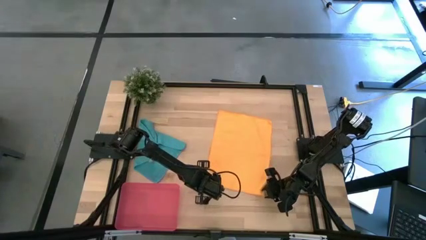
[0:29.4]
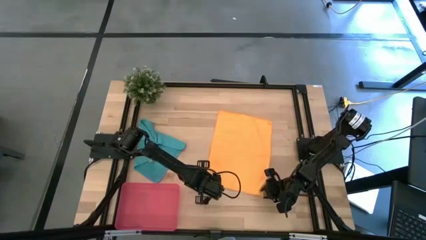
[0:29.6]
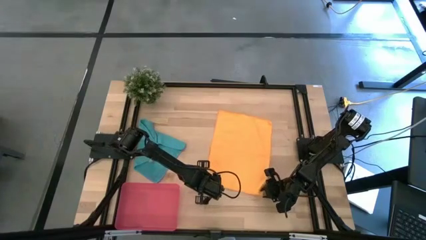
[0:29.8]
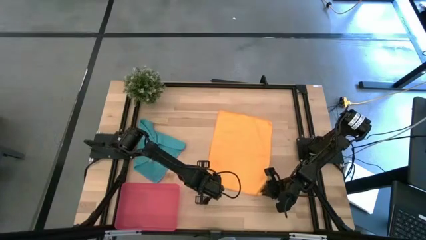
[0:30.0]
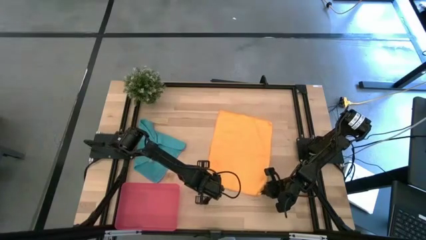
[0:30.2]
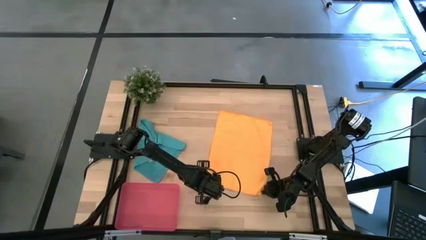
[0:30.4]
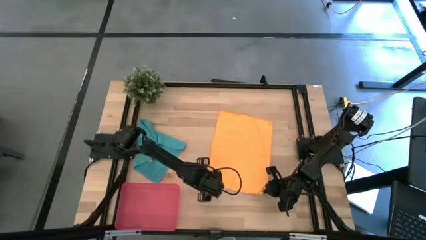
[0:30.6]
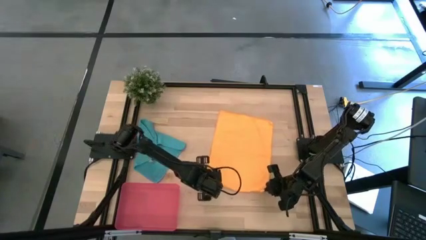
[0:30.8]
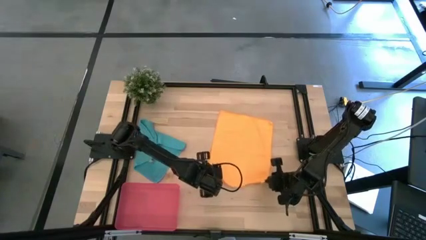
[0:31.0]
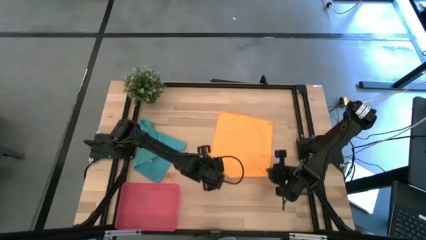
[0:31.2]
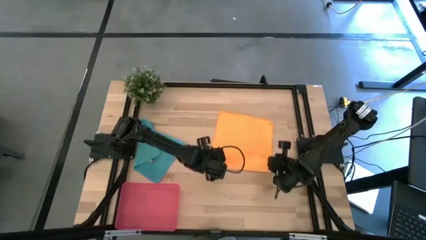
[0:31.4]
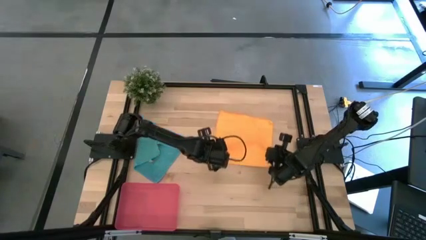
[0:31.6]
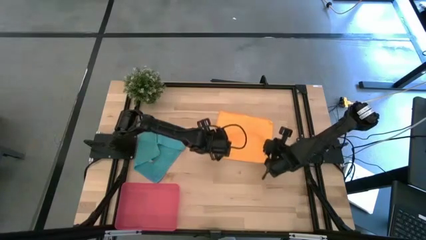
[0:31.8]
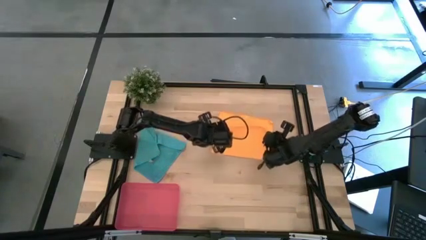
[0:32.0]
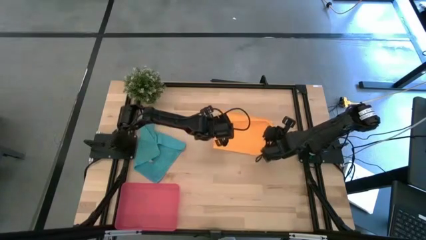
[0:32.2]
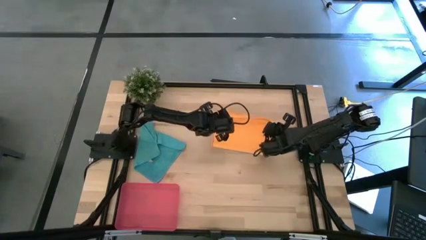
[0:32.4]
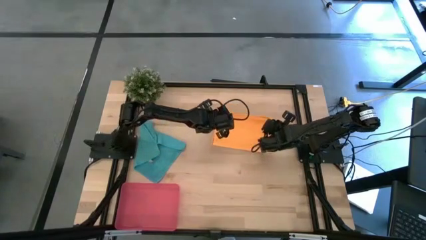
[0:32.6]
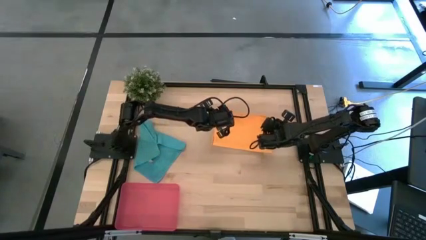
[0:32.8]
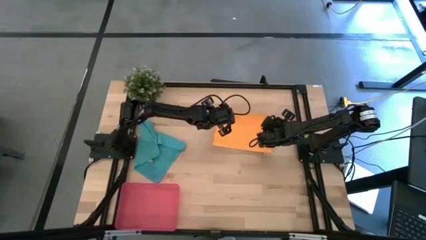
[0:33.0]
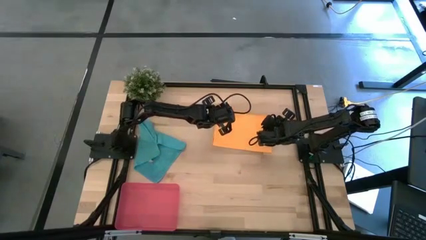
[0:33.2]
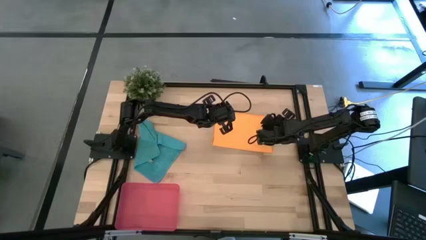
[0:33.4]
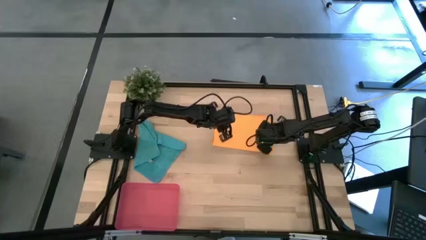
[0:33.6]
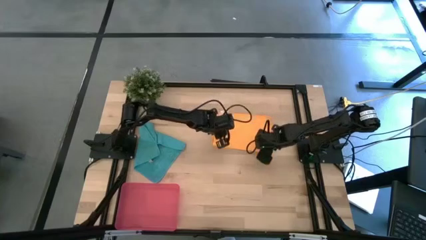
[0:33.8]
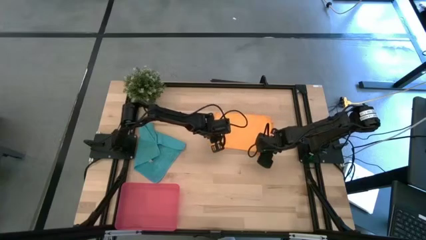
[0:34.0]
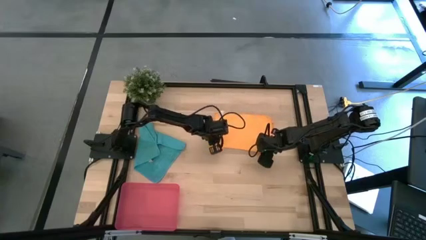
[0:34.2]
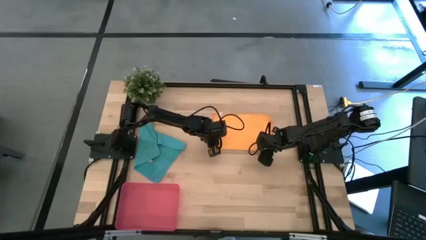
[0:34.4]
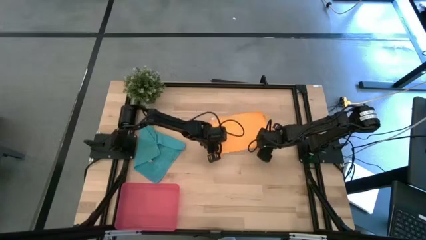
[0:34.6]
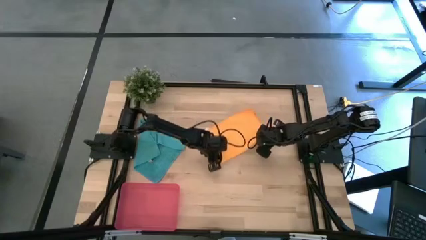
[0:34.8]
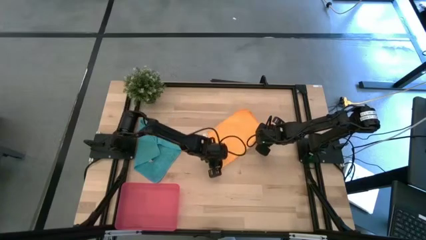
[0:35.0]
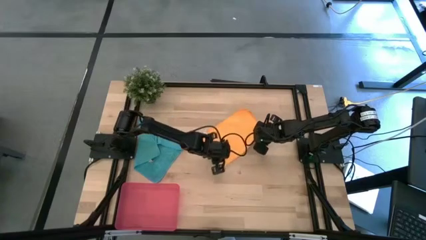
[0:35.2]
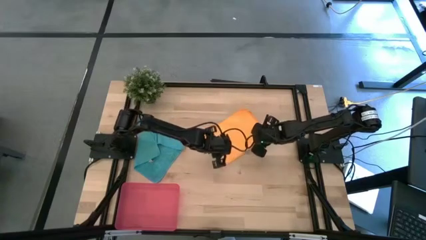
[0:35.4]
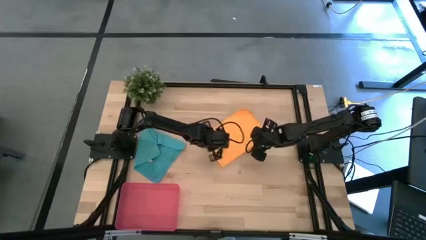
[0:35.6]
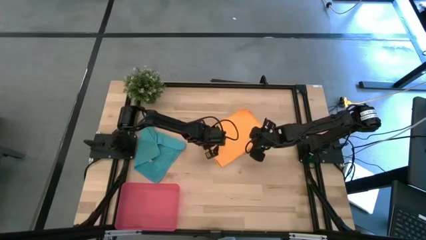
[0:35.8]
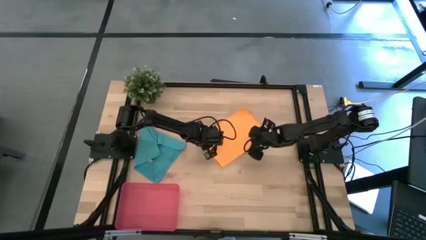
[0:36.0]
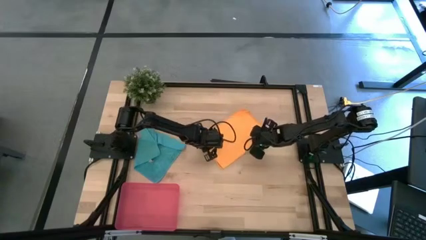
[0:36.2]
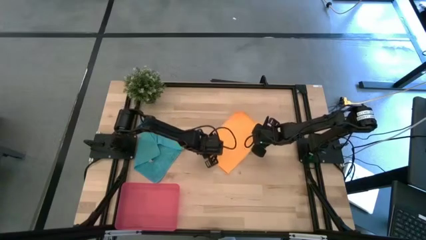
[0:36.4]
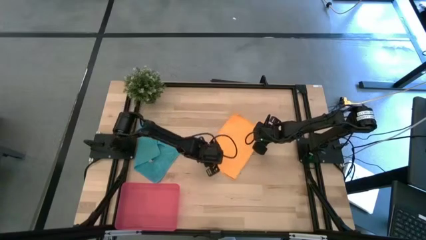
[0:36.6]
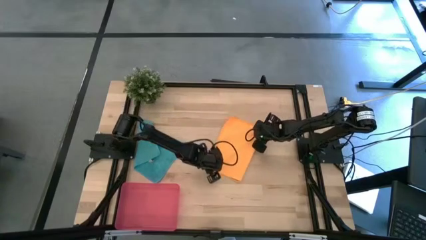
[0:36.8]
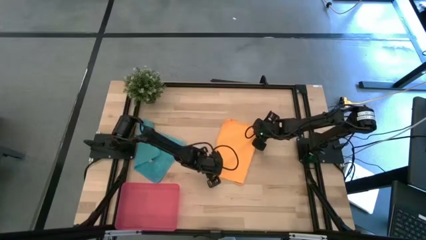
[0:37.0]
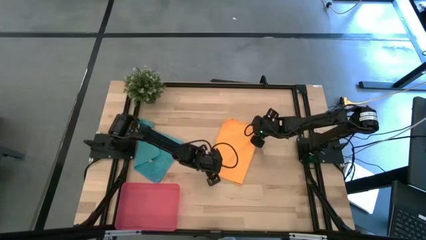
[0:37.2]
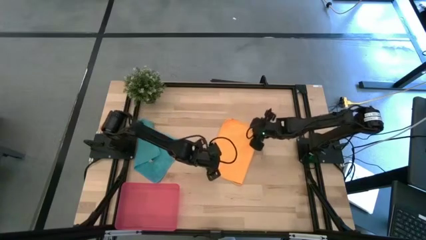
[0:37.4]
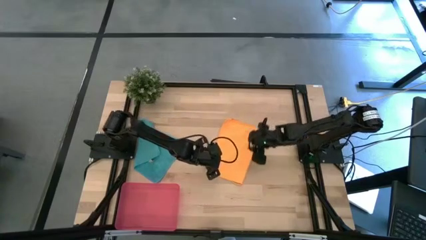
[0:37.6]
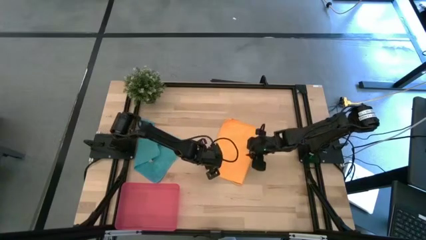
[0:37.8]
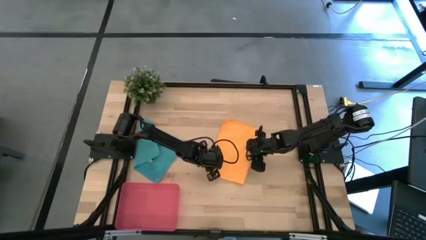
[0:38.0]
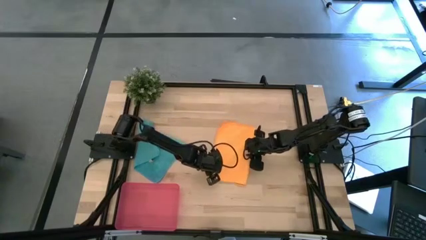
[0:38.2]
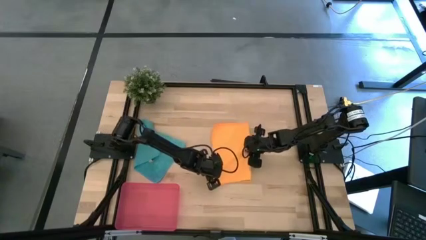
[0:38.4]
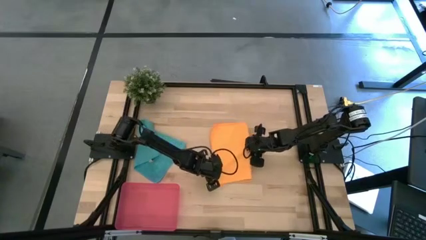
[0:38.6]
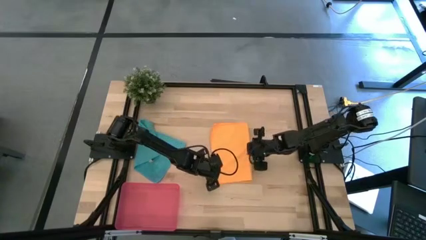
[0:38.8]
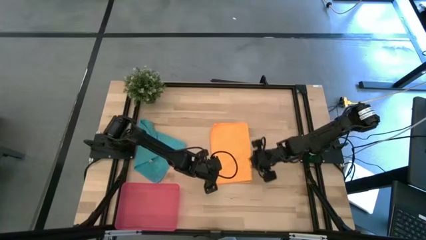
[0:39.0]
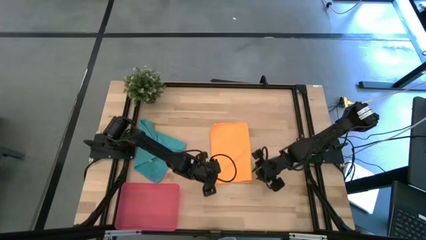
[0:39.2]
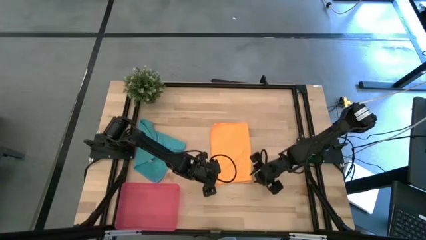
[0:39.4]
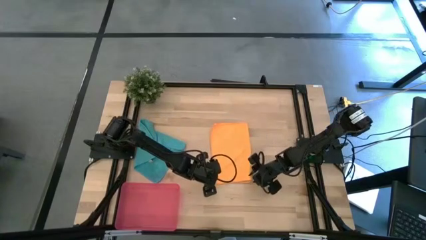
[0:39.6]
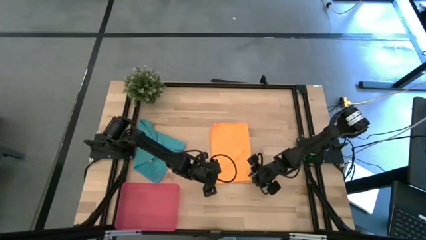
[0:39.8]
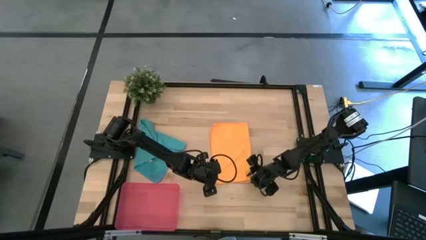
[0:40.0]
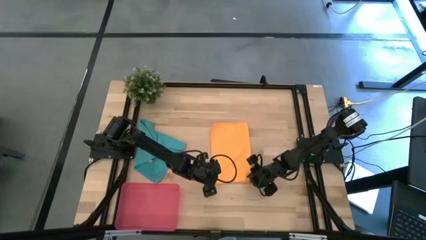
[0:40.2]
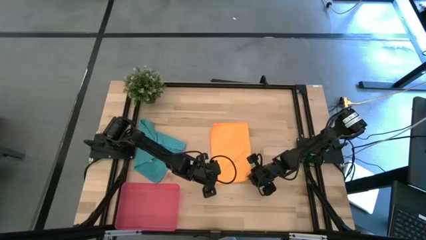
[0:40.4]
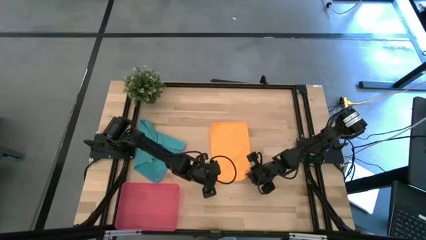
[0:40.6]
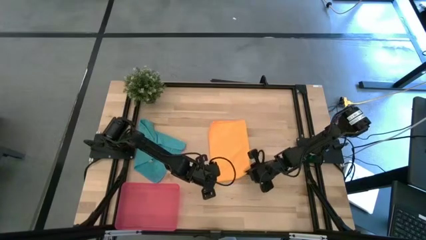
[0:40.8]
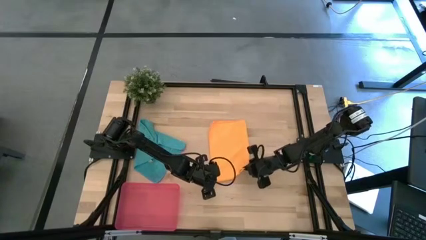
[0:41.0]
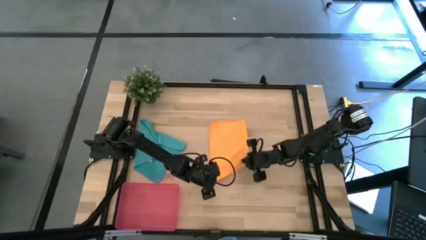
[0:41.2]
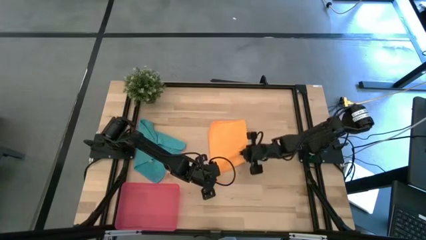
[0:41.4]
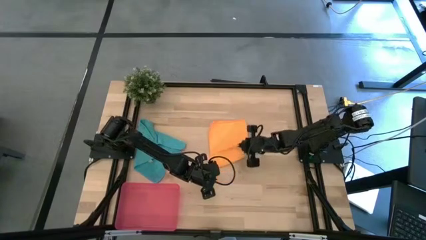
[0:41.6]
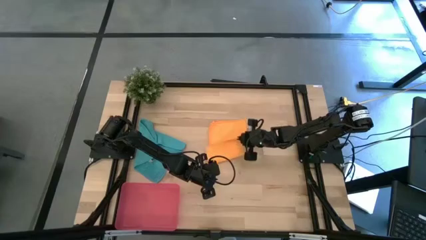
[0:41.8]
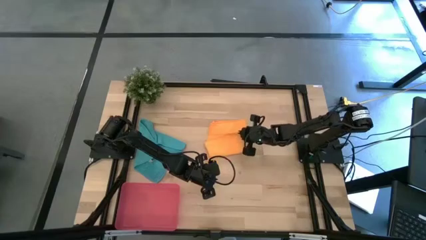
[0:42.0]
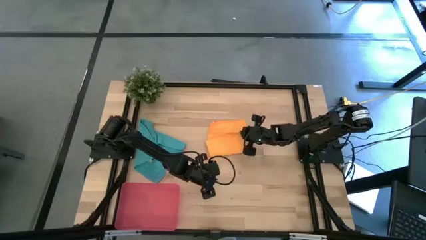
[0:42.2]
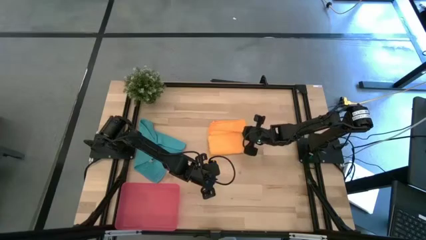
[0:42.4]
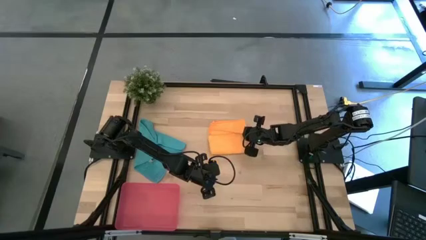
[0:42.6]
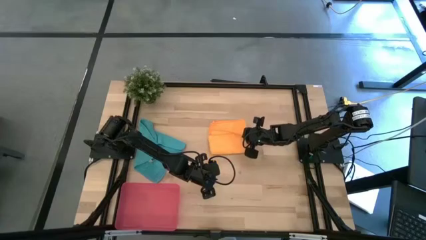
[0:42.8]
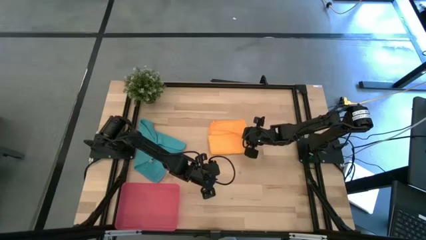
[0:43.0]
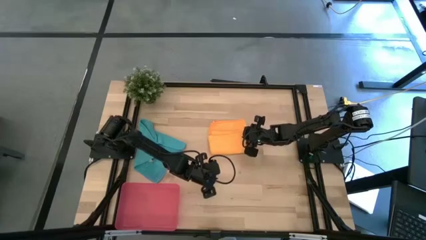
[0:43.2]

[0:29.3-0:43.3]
Task: Roll microfiber towels into tight, uniform cylinder then place into a basket
Fold the yellow microfiber cloth
